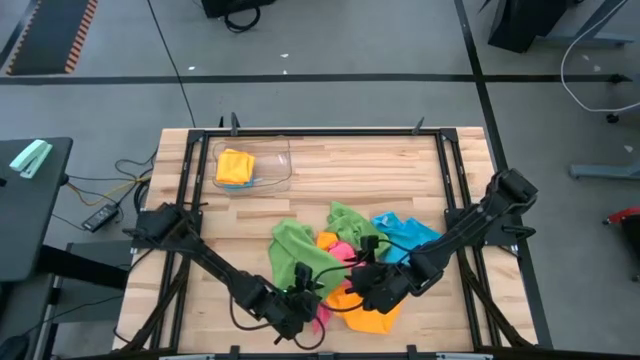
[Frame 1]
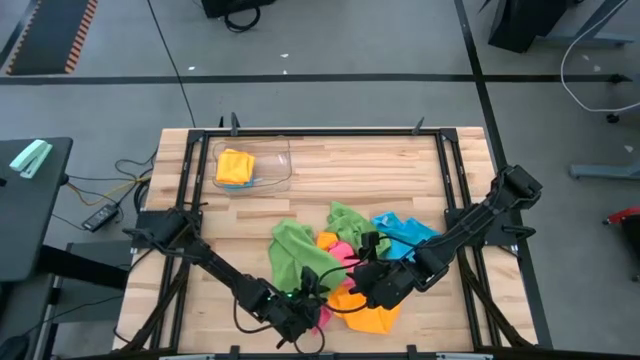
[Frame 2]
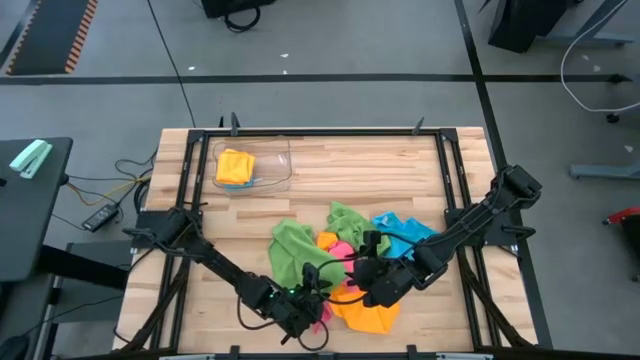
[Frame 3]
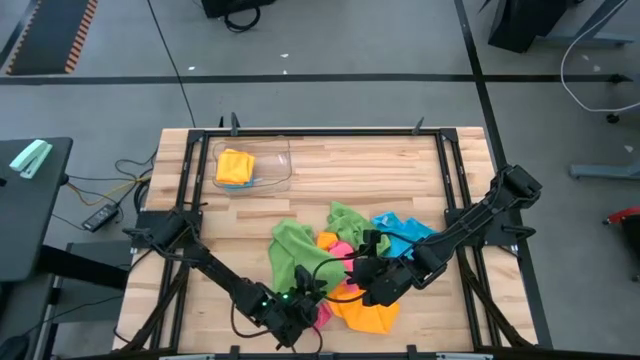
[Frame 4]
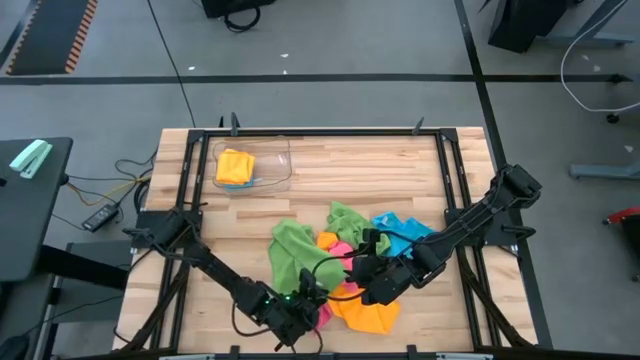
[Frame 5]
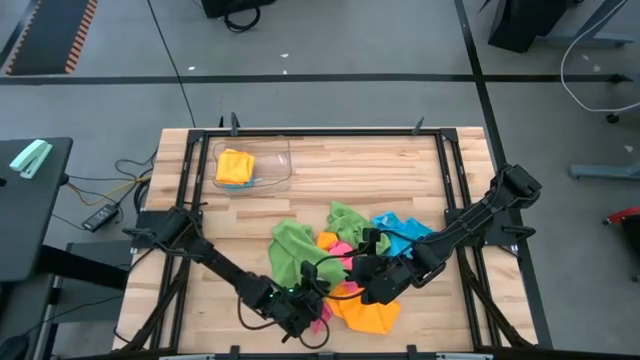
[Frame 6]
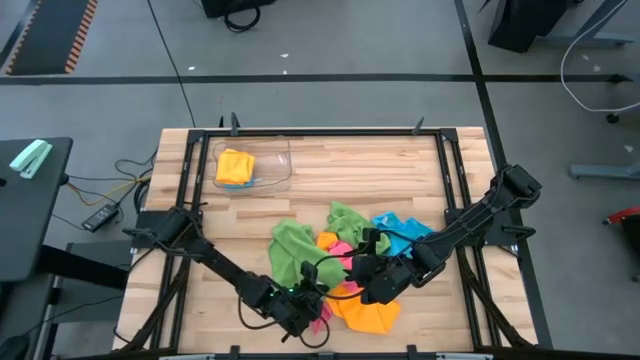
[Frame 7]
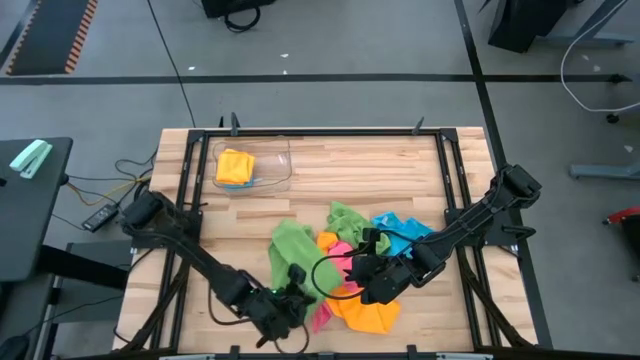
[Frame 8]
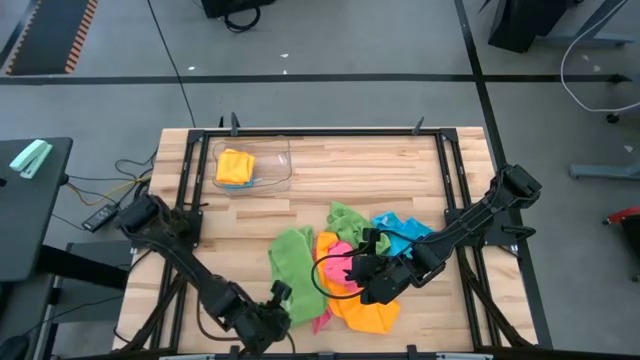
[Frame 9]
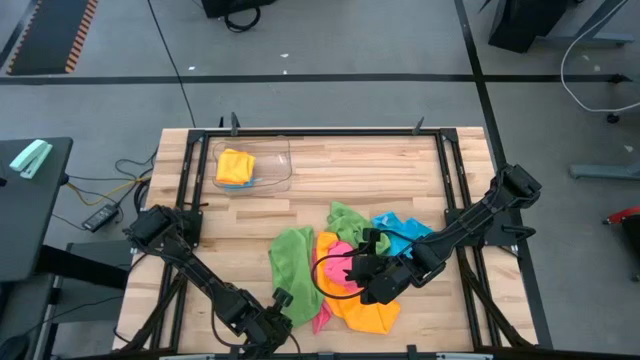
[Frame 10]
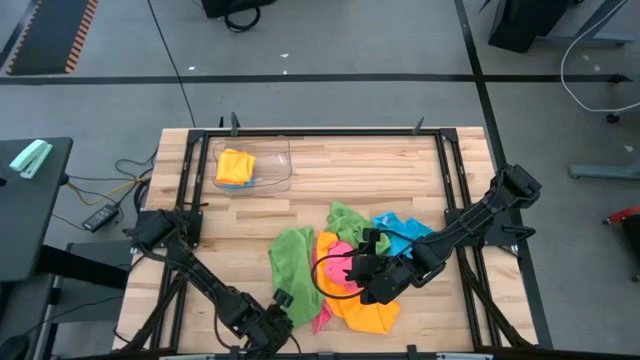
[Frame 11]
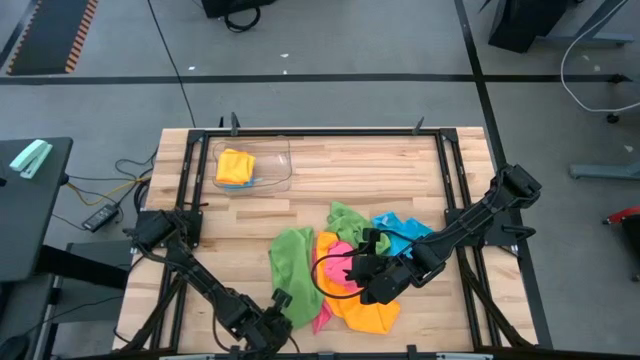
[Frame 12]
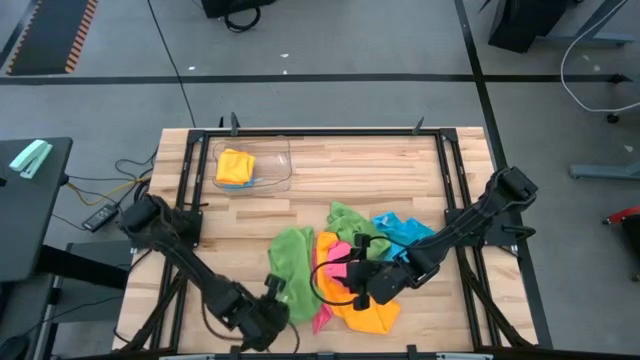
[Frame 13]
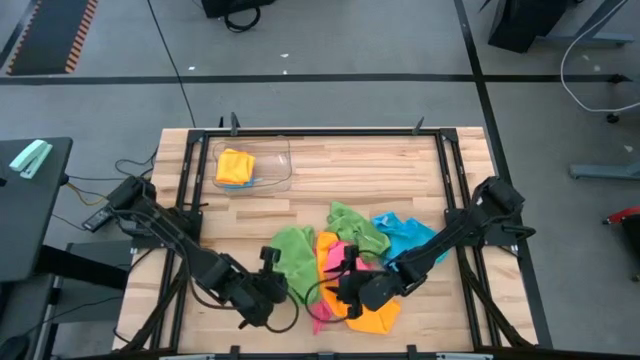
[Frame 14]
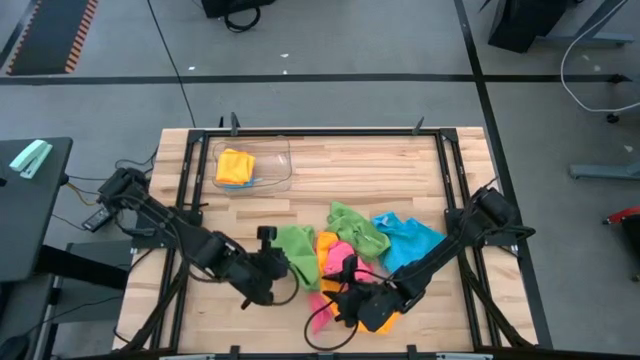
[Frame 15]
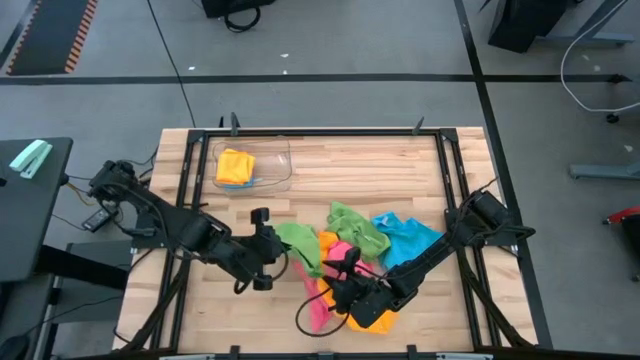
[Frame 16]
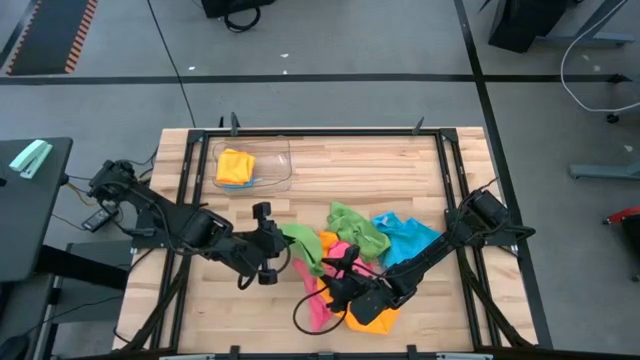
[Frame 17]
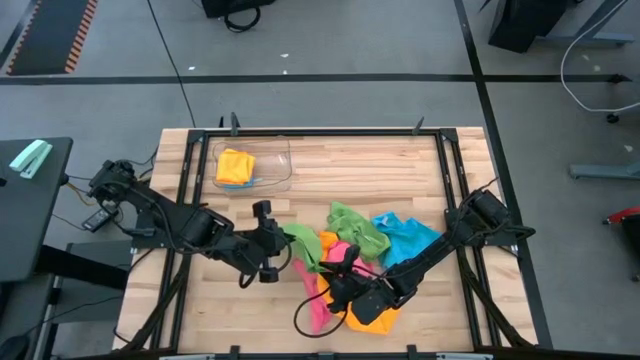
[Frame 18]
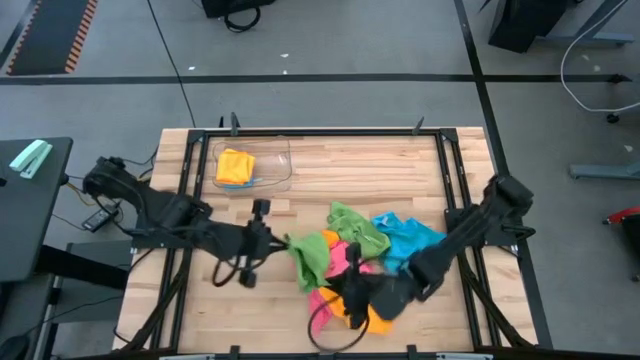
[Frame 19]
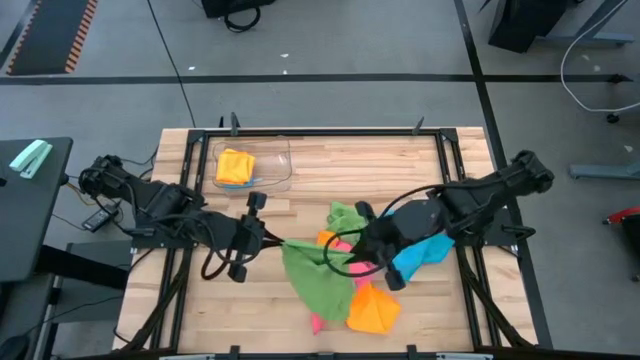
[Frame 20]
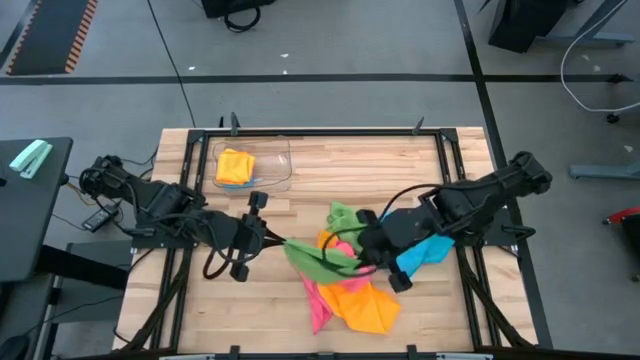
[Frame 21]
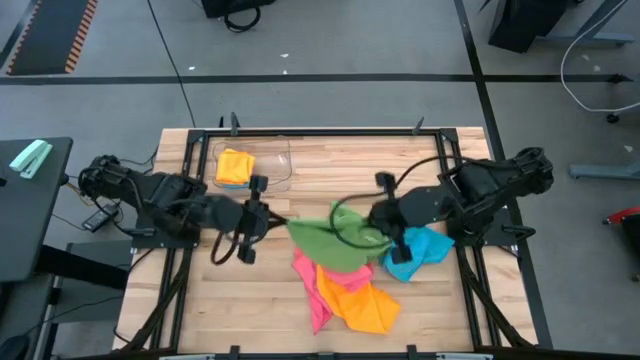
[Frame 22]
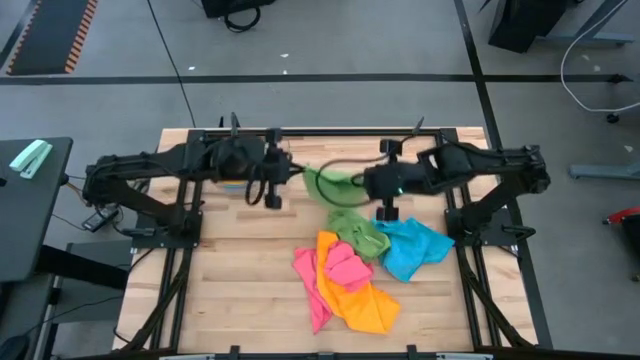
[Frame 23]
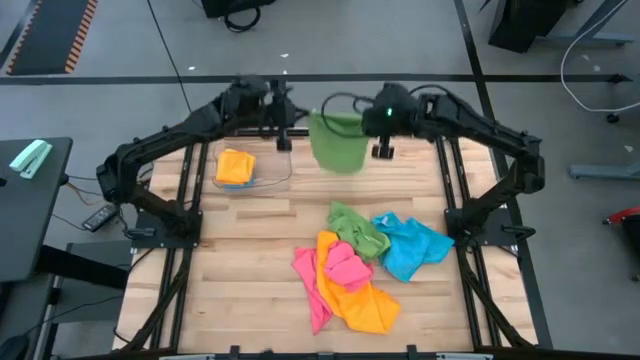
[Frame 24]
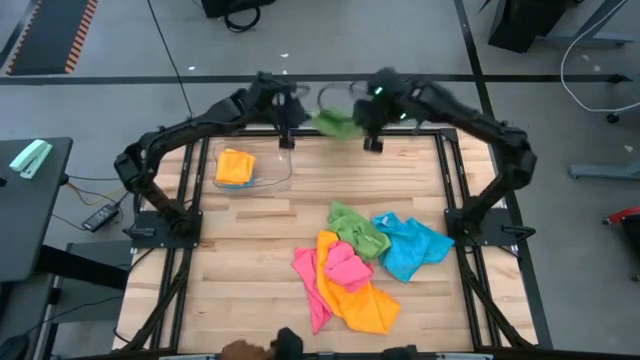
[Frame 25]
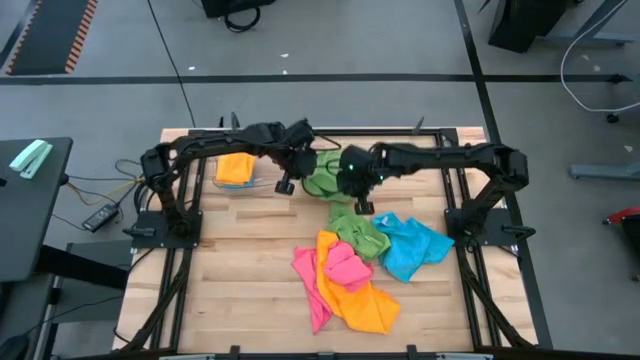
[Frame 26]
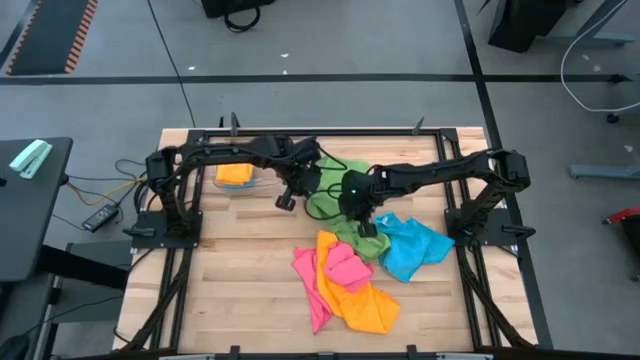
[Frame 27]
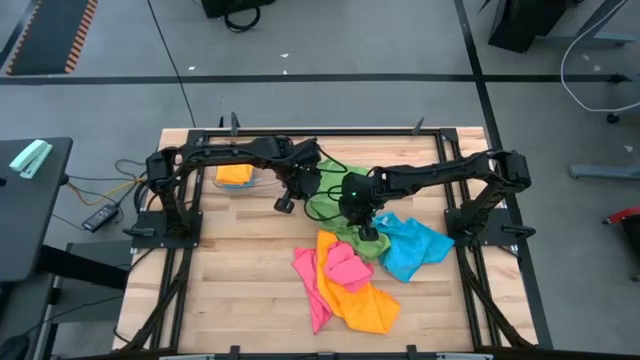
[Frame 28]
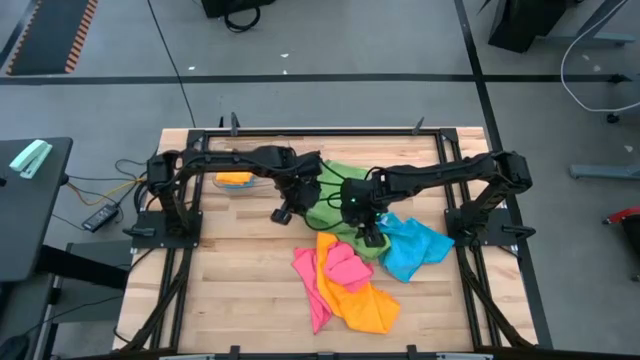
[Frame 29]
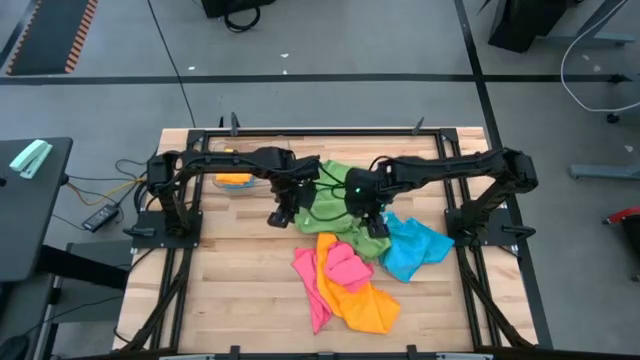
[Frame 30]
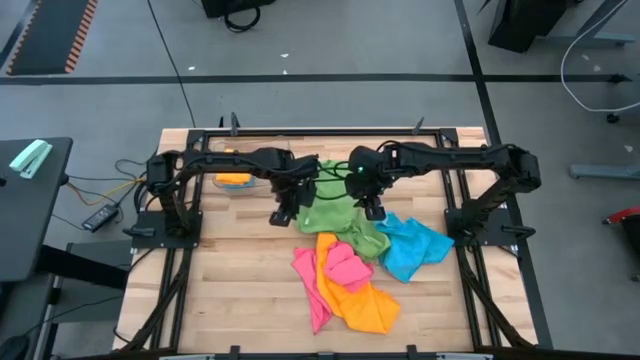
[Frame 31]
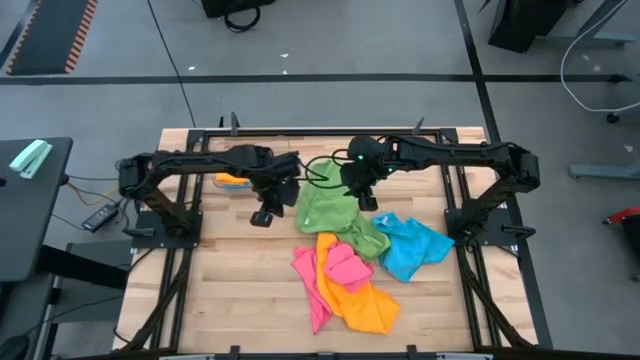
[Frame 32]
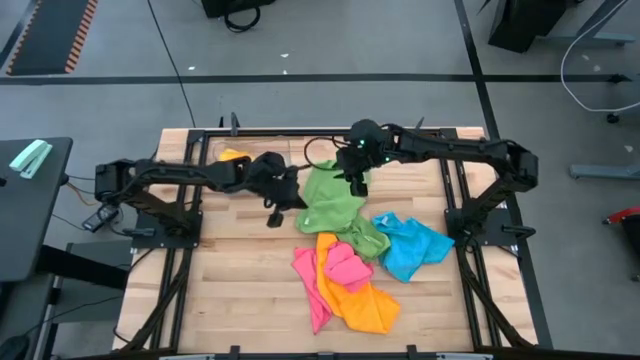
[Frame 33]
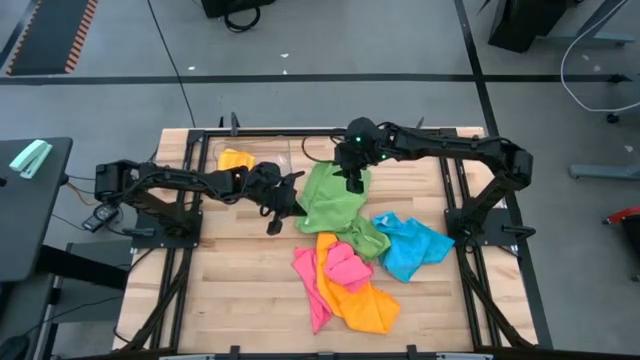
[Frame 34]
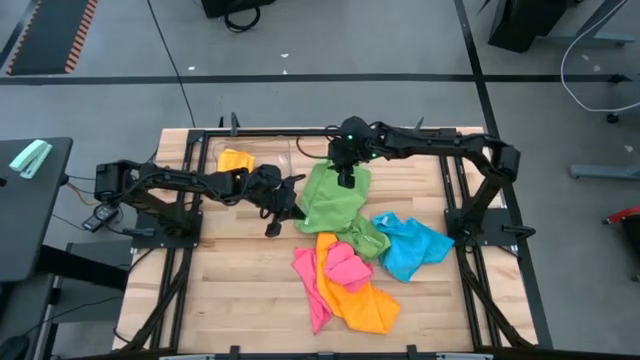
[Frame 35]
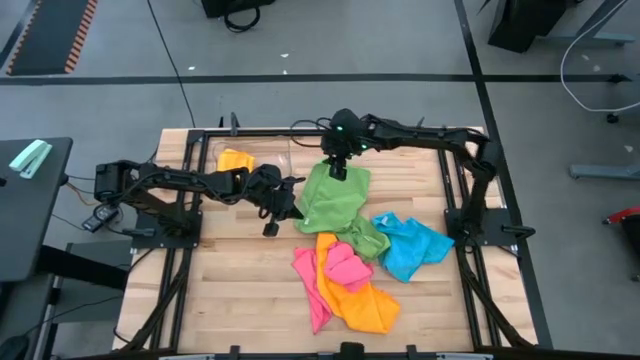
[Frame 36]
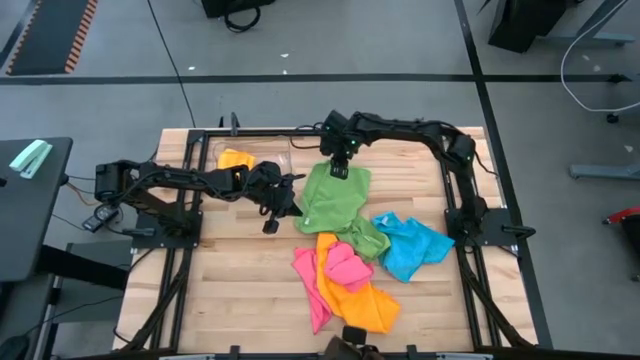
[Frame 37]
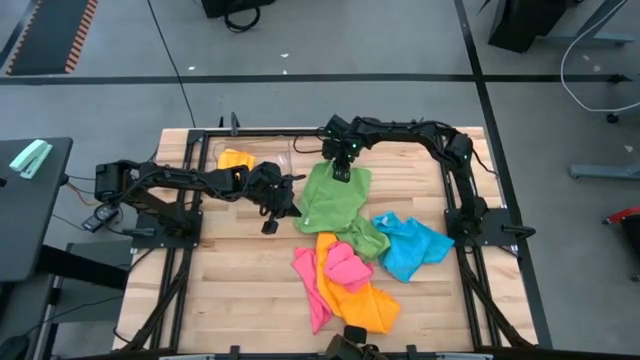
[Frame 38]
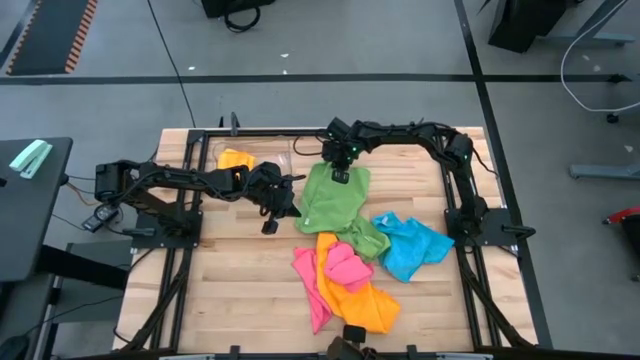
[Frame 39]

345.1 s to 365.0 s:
Task: Fold microfiber towels
Fold the left green microfiber towel

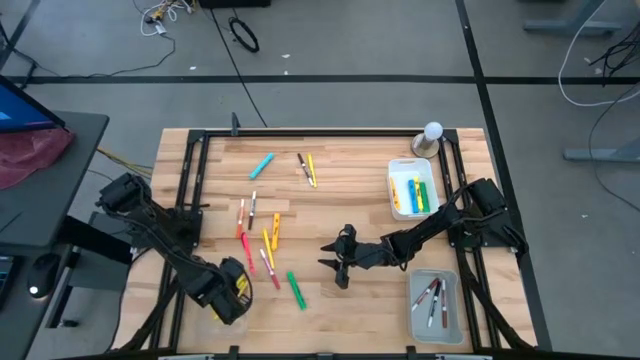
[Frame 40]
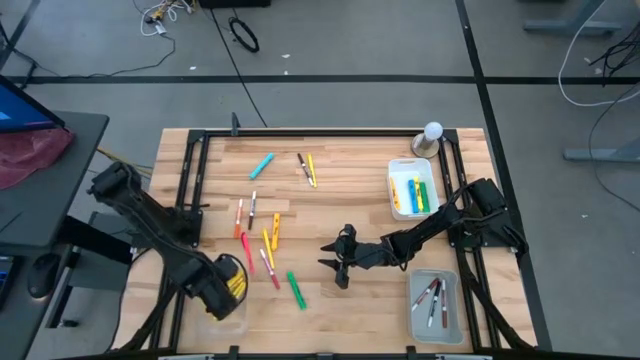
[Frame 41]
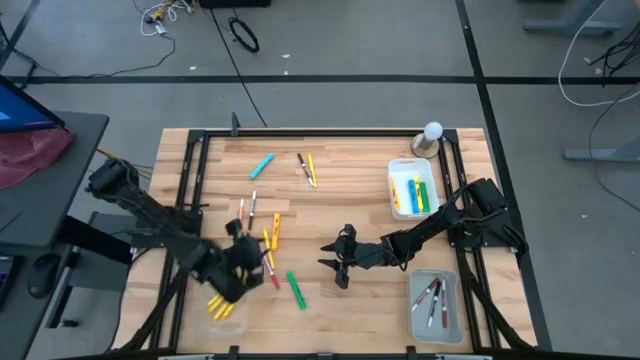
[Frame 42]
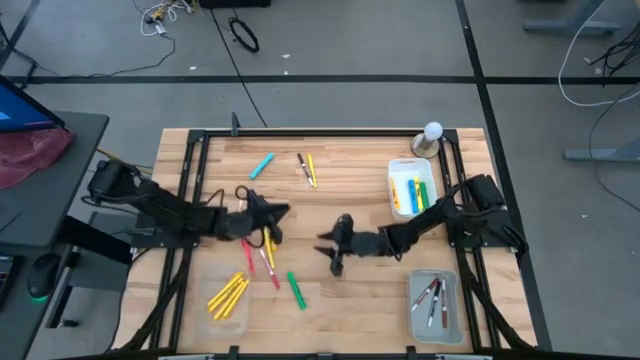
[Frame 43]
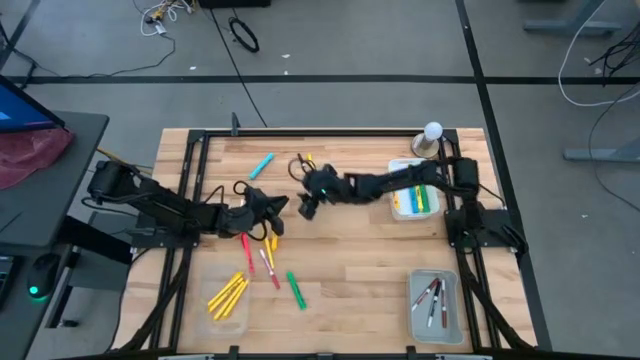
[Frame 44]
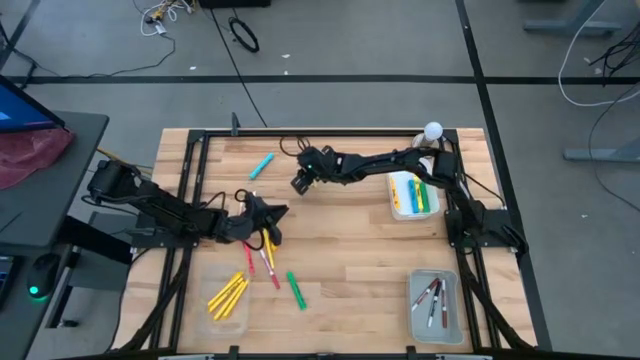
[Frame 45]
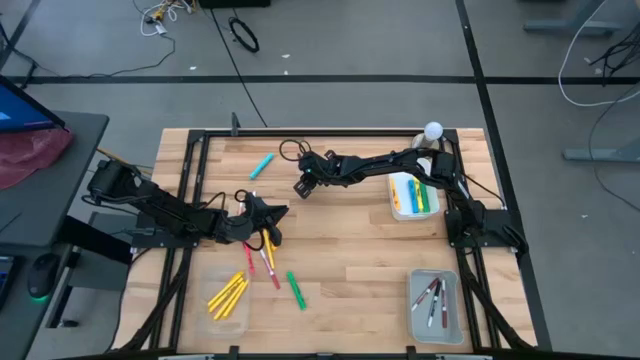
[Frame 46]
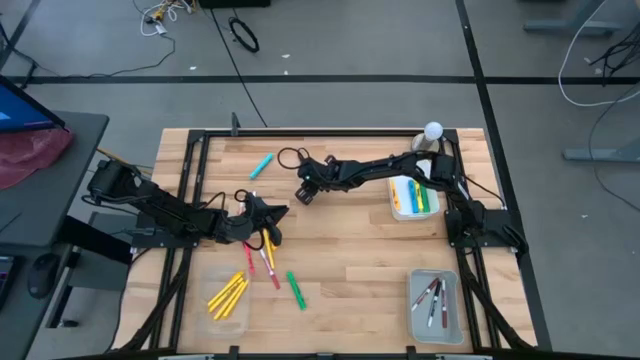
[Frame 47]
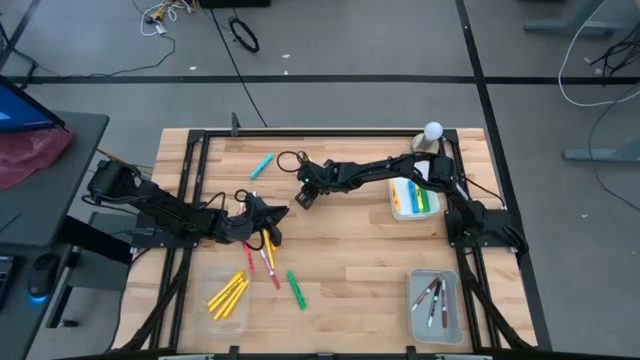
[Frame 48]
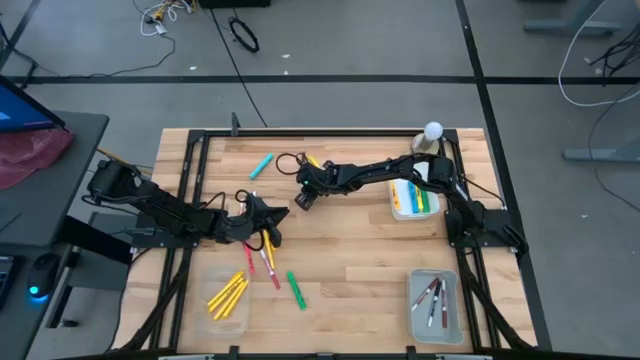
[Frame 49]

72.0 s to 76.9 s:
Task: Pick & Place Markers
Put the brown marker into the gray bin
